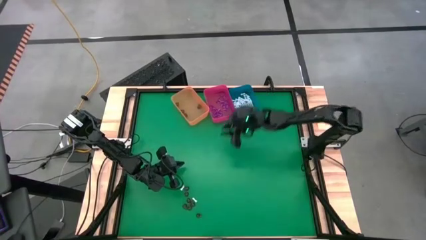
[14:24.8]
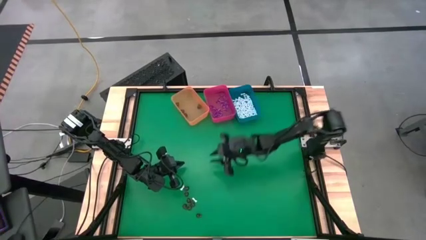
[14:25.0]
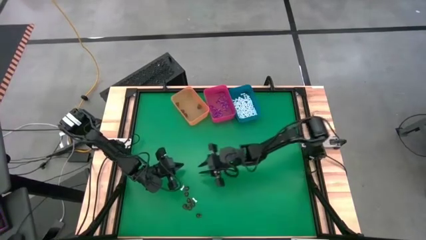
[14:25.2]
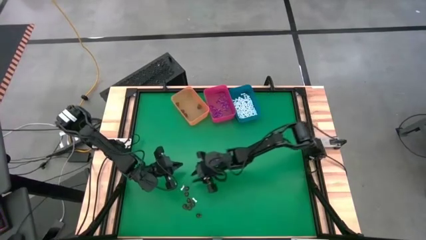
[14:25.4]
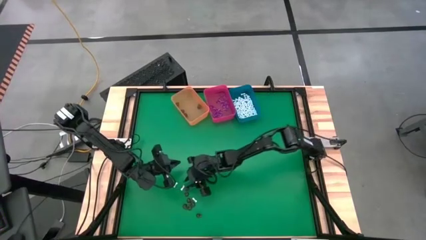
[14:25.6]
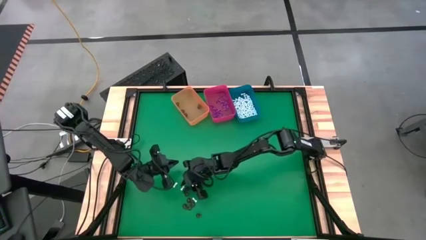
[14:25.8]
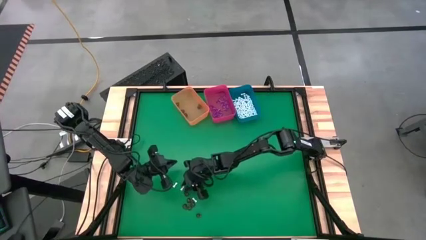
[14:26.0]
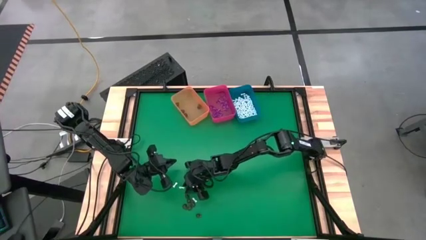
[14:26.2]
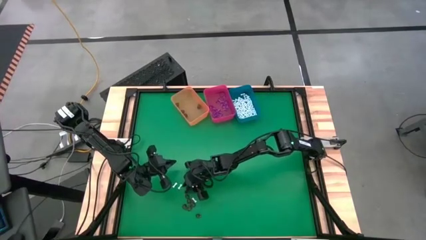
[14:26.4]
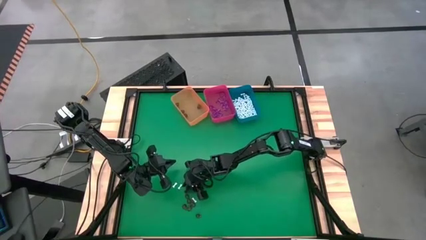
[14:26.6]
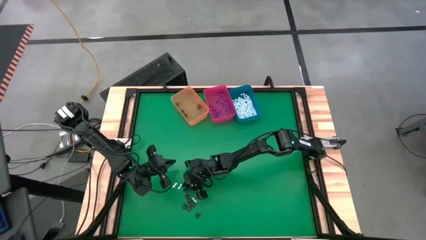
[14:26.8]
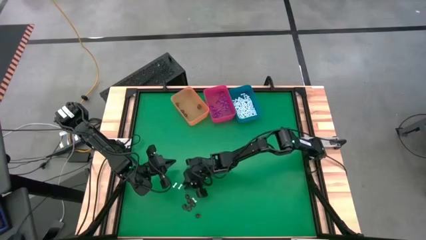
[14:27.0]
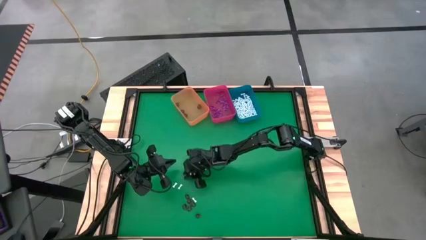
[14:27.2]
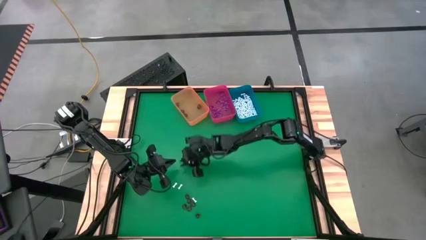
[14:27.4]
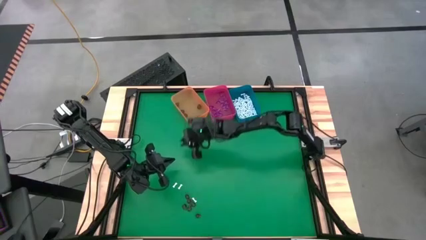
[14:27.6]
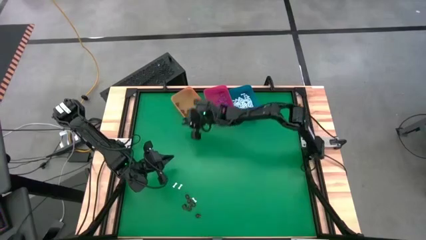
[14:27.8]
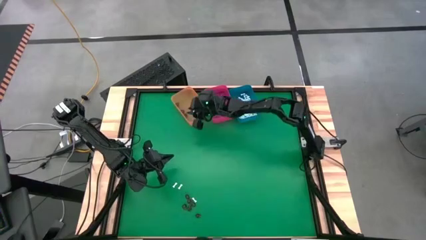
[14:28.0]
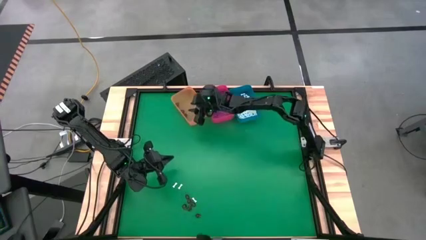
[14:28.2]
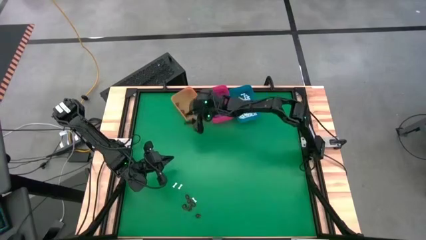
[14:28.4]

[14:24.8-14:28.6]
Task: Sort Halloween decoration
Put the transparent black skull toy into the orange bin

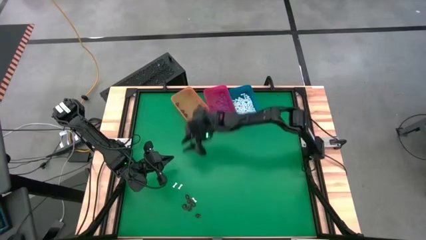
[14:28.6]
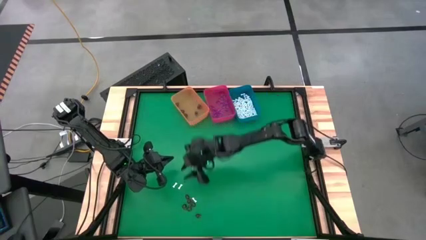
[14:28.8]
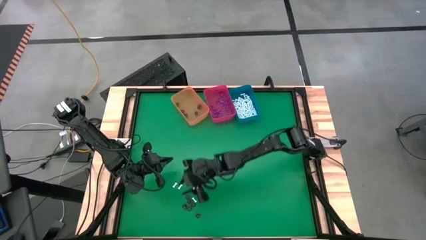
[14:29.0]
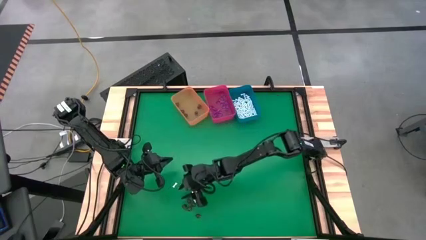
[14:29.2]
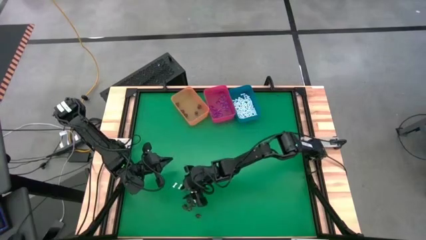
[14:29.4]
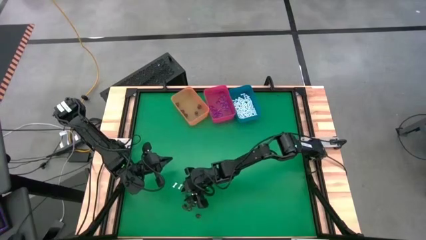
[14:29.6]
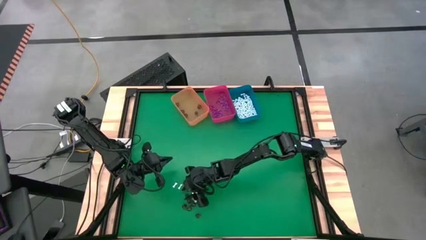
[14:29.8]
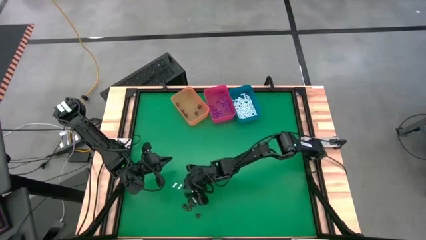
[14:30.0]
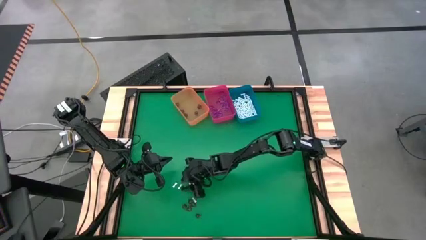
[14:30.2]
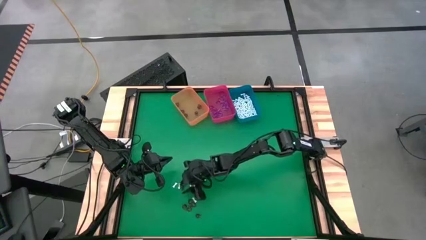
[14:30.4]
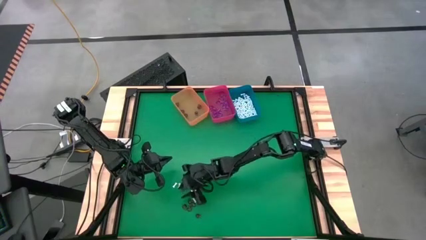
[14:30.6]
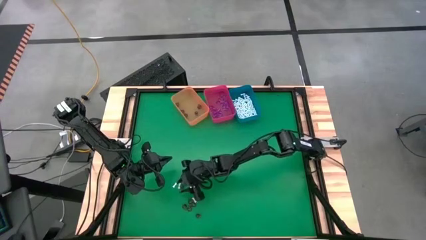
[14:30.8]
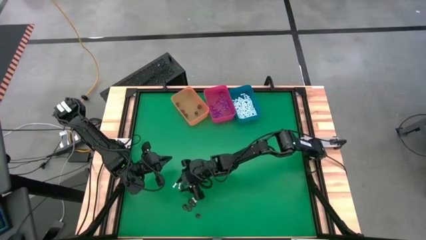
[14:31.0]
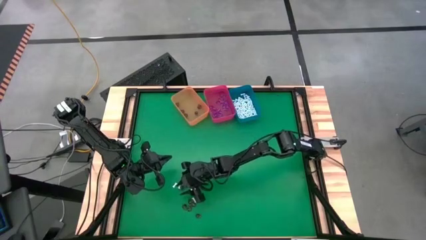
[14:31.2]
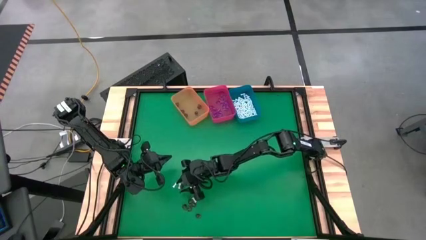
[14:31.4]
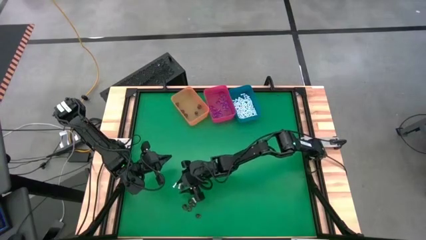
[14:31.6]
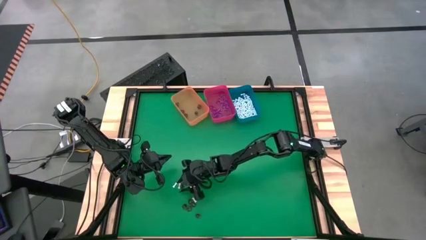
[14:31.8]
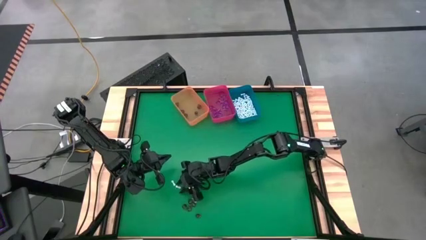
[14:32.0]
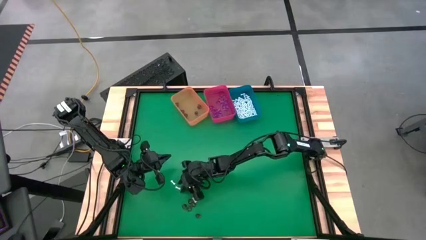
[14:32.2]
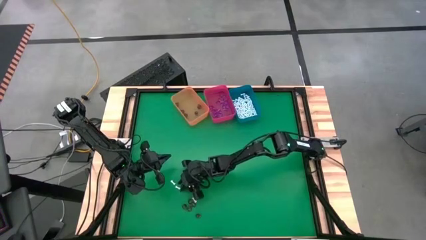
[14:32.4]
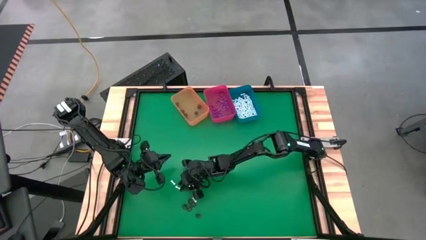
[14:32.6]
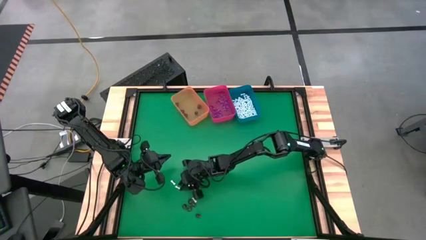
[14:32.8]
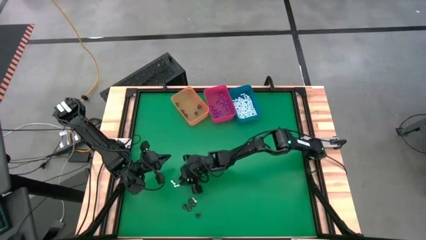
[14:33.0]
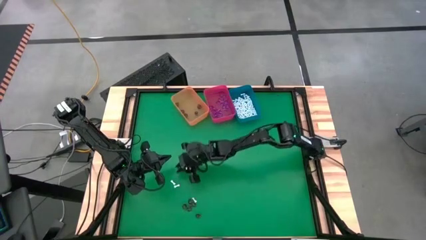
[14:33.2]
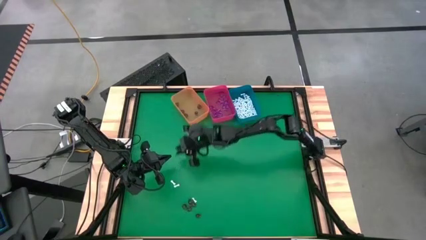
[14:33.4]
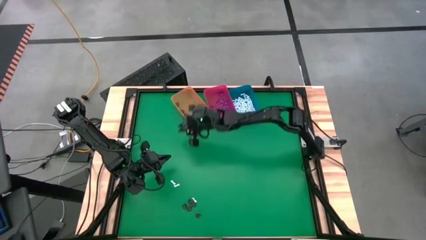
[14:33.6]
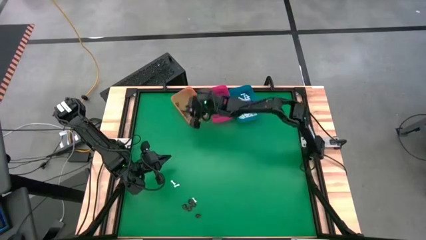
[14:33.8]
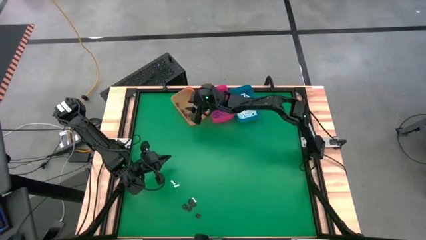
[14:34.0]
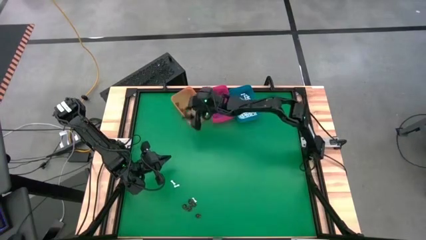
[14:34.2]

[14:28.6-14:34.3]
Put the transparent black skull toy into the orange bin

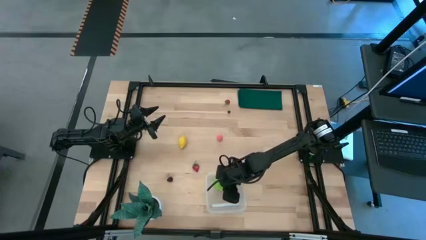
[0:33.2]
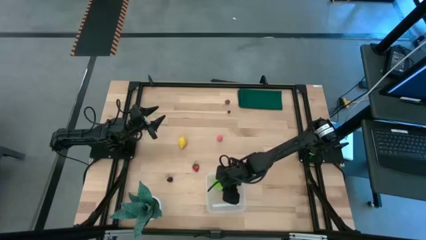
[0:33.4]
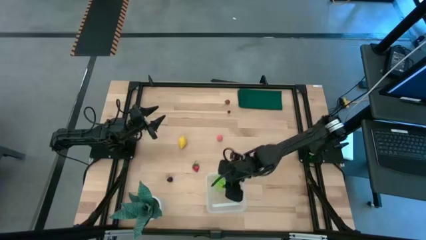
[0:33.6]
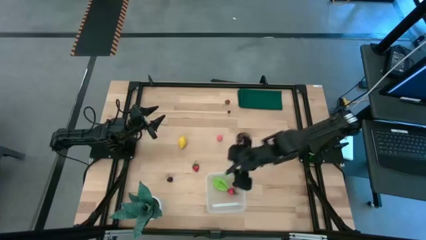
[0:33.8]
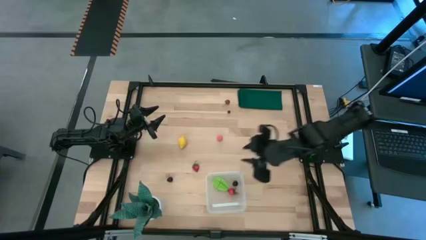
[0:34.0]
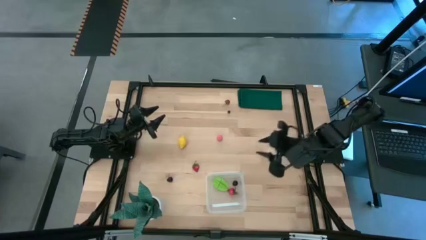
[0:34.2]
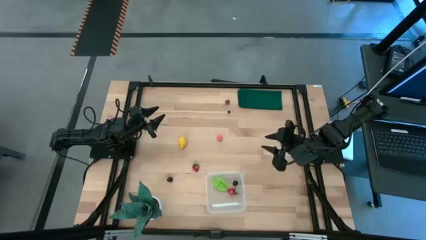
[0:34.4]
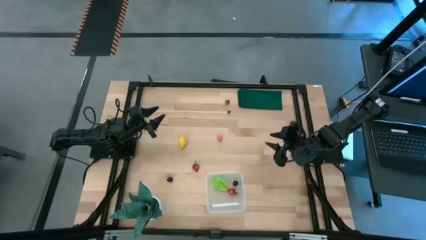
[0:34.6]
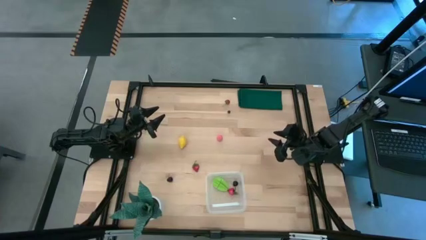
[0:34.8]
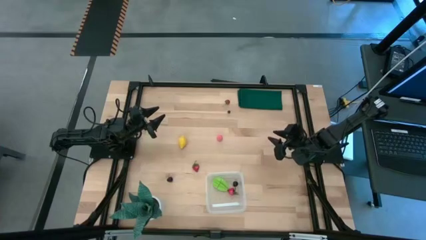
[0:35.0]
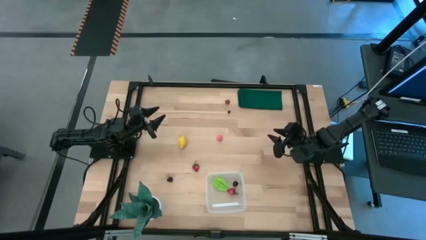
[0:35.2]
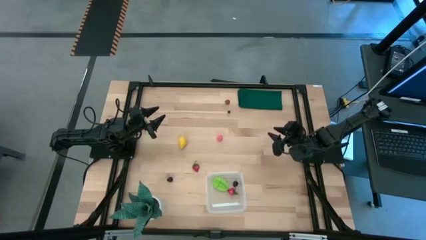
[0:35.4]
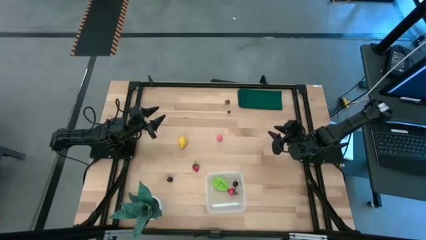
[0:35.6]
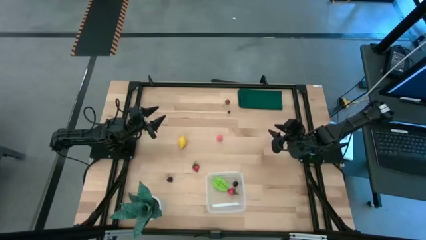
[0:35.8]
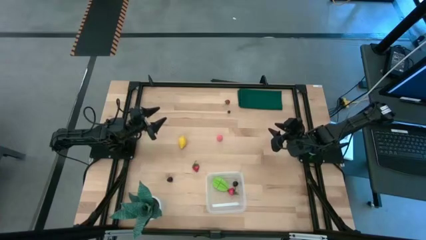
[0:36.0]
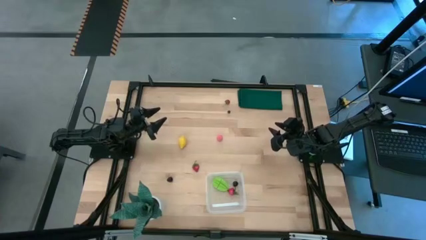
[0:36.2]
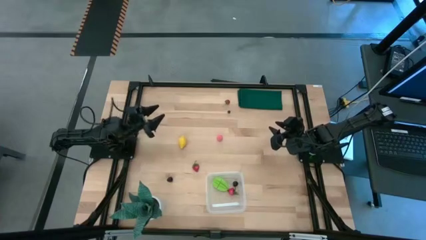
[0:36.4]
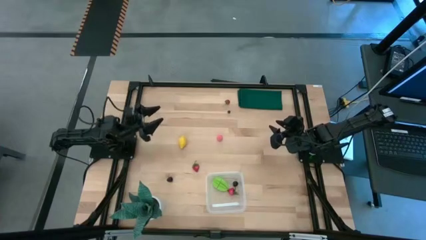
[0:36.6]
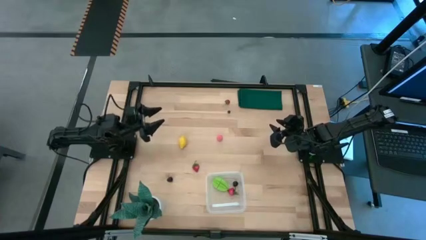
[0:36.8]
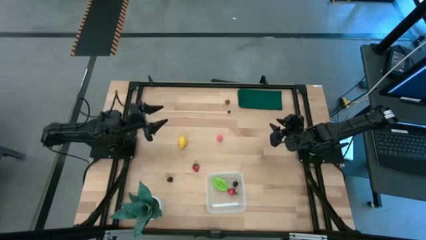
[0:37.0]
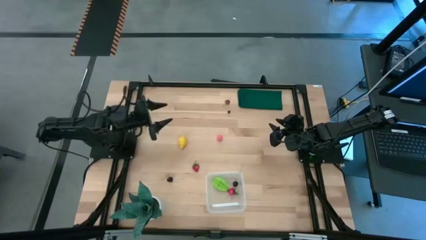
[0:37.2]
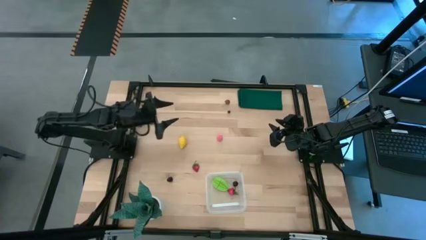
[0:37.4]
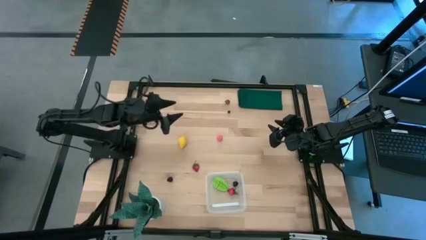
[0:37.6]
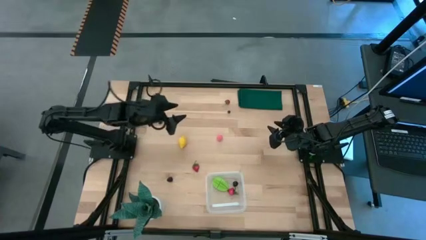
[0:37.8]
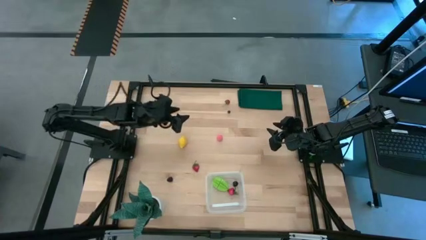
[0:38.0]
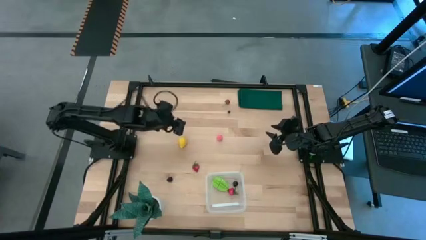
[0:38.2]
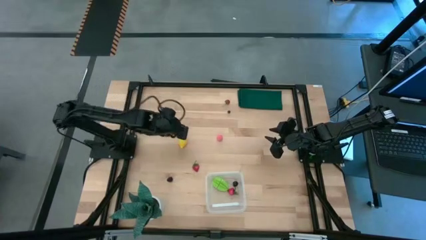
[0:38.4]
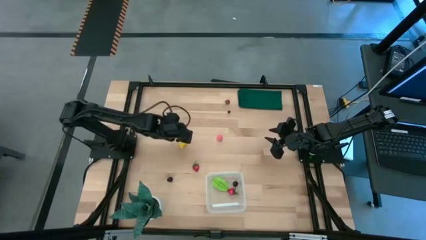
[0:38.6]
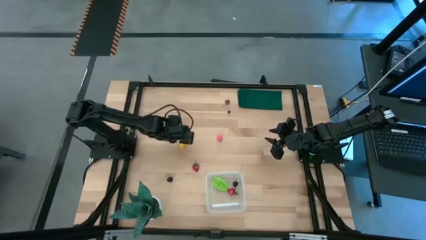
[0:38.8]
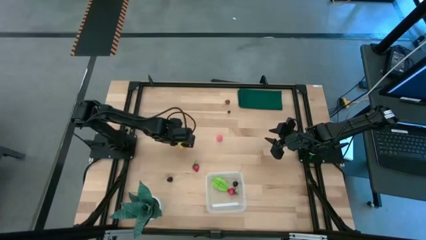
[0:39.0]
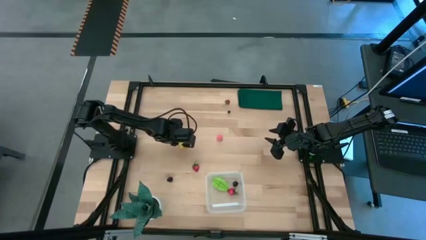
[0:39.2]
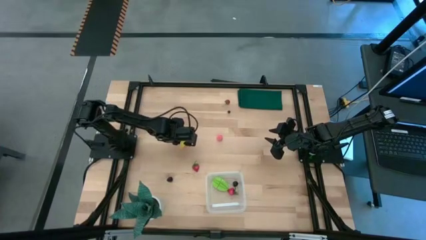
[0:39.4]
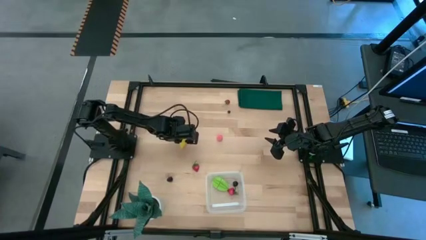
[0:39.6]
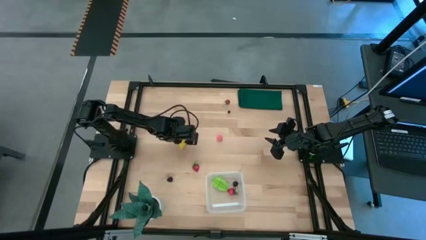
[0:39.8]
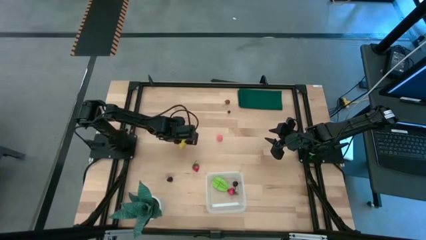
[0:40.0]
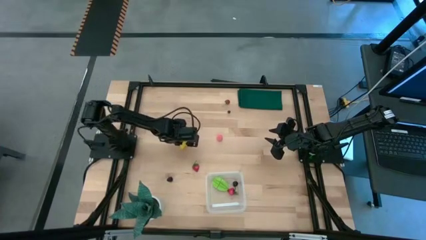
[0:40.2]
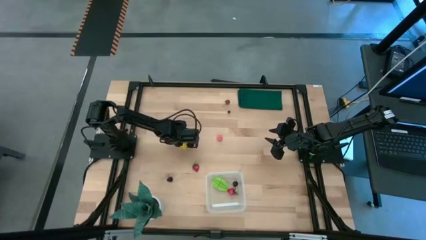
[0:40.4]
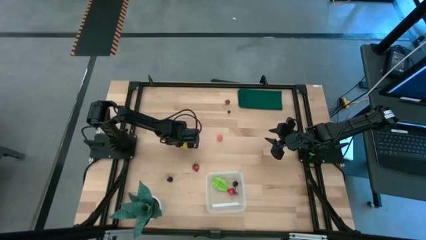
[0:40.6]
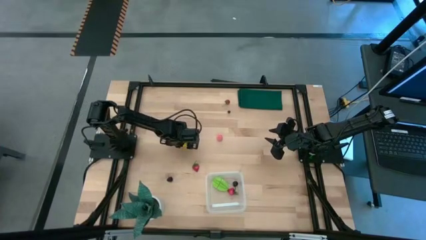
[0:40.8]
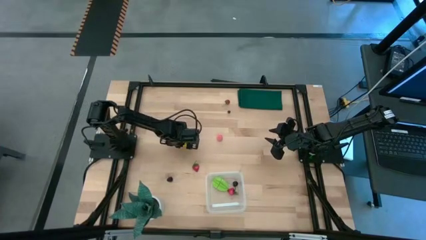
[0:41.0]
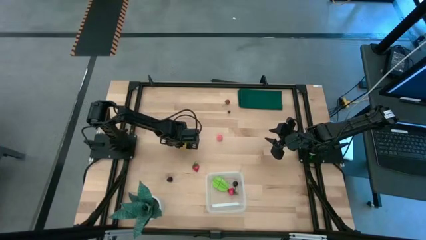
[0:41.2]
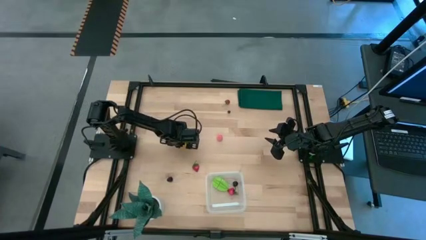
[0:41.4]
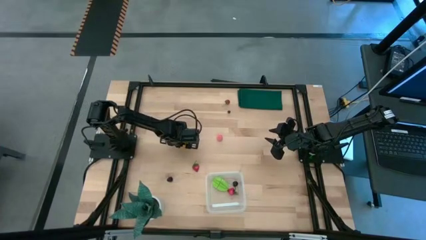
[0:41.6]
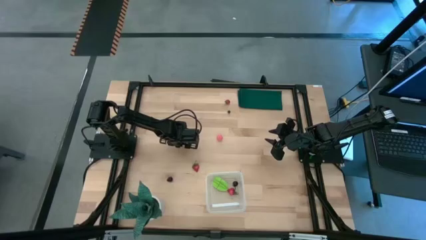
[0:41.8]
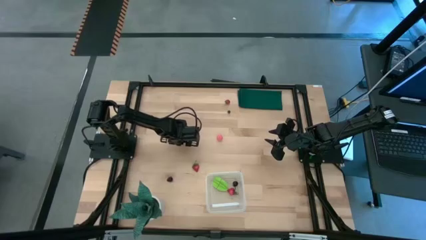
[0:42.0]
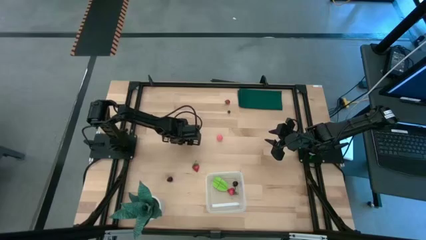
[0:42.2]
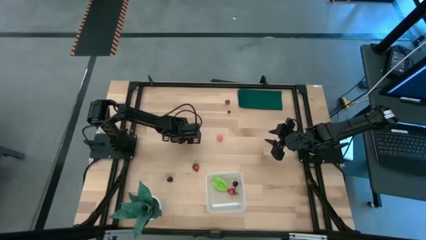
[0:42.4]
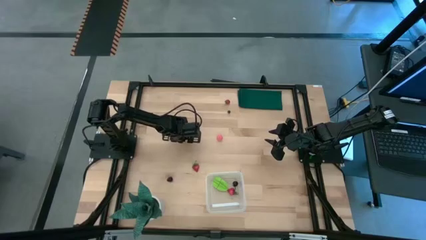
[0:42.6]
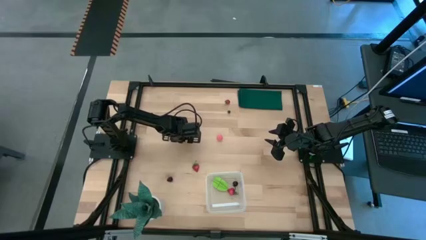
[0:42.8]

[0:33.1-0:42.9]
Task: Pick and placing Produce into tupperware
Put the yellow lemon into the transparent bin
